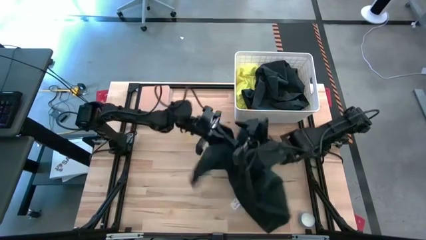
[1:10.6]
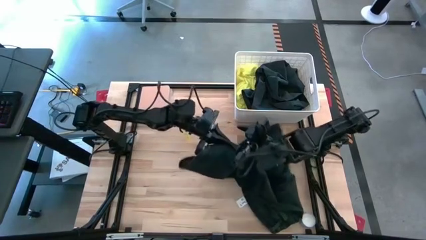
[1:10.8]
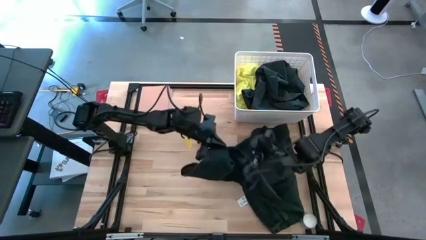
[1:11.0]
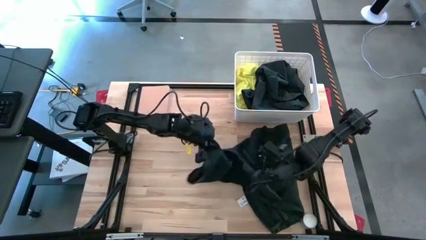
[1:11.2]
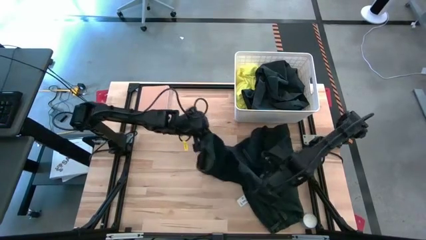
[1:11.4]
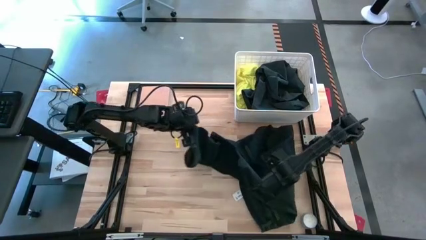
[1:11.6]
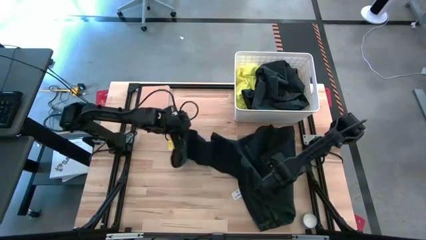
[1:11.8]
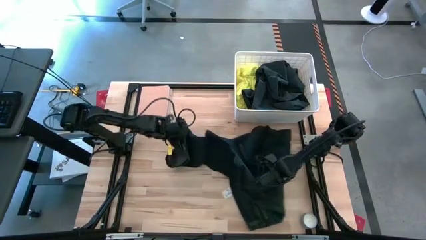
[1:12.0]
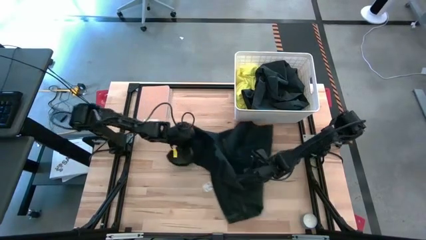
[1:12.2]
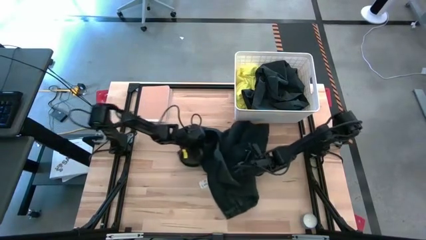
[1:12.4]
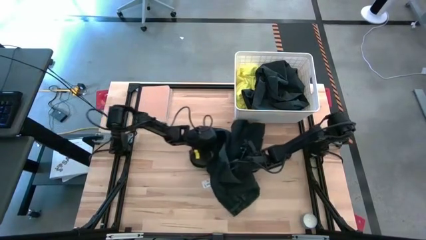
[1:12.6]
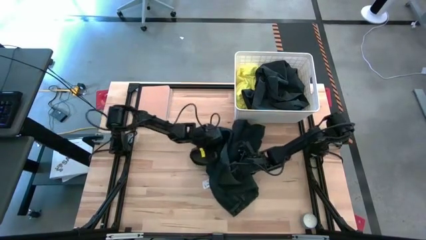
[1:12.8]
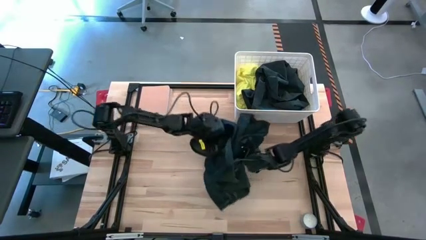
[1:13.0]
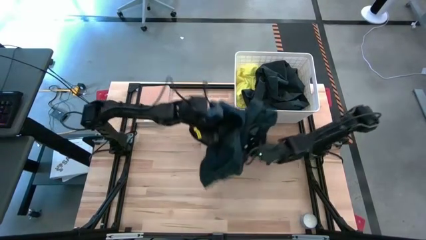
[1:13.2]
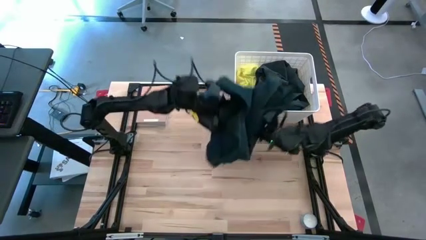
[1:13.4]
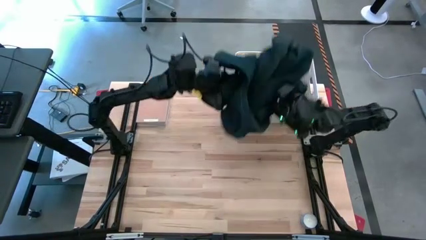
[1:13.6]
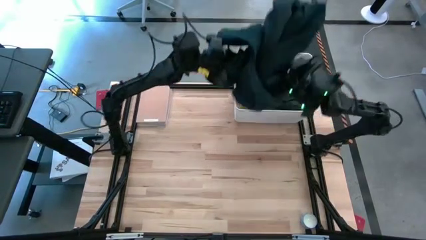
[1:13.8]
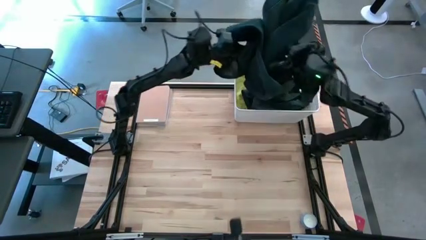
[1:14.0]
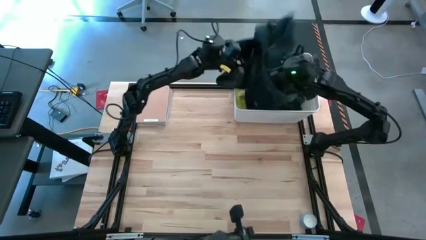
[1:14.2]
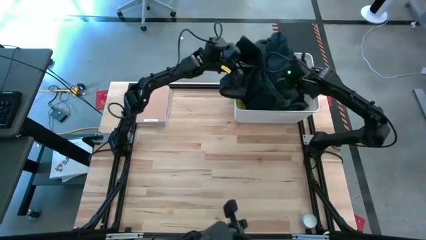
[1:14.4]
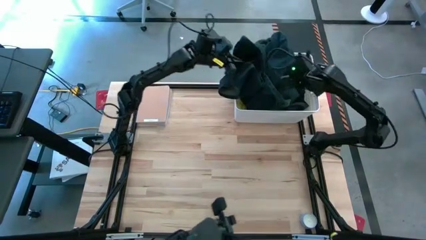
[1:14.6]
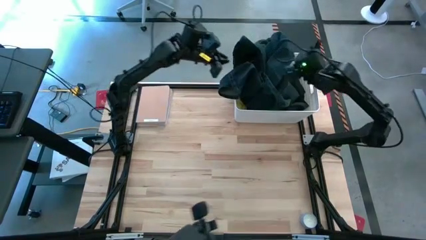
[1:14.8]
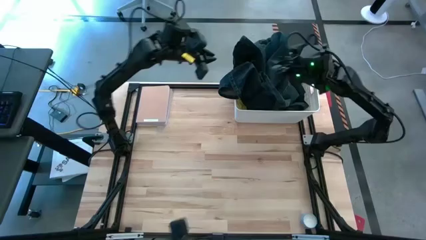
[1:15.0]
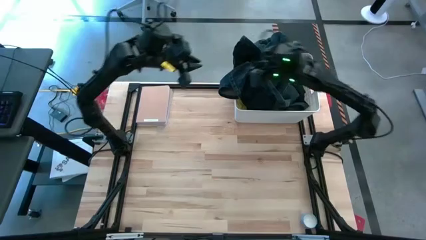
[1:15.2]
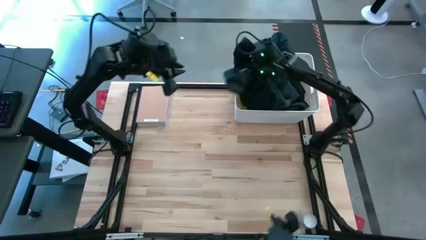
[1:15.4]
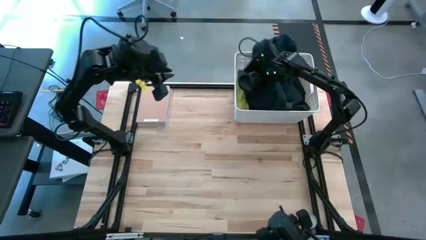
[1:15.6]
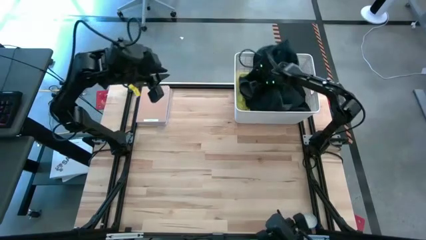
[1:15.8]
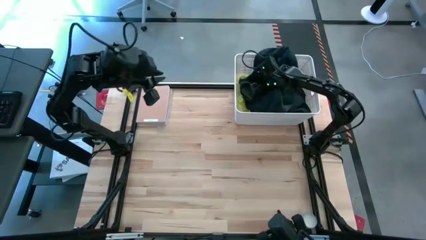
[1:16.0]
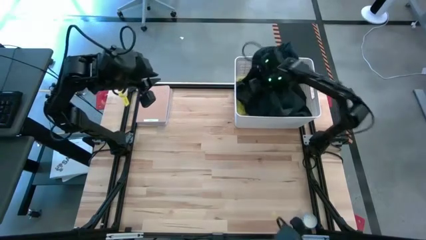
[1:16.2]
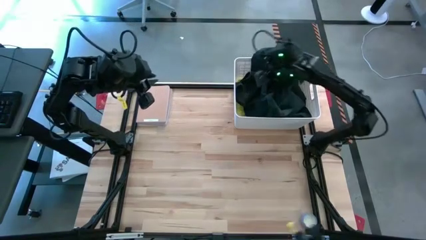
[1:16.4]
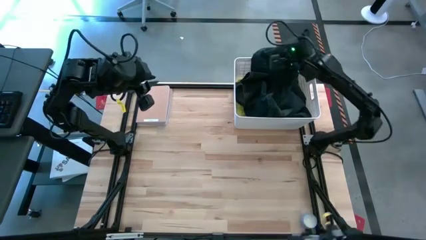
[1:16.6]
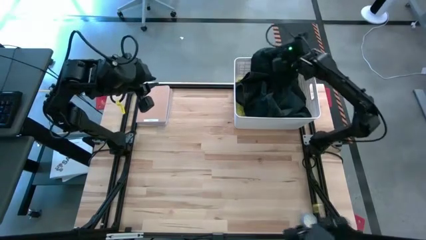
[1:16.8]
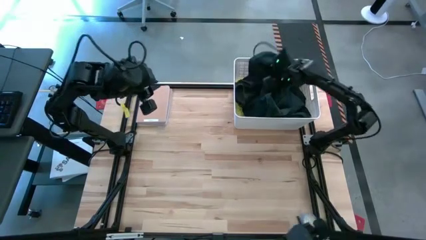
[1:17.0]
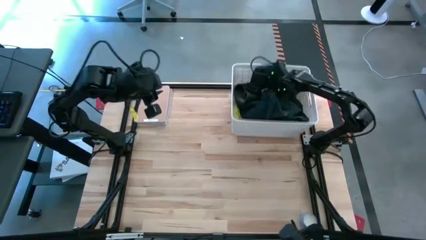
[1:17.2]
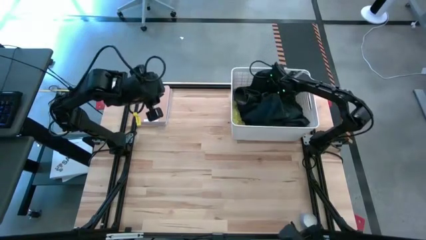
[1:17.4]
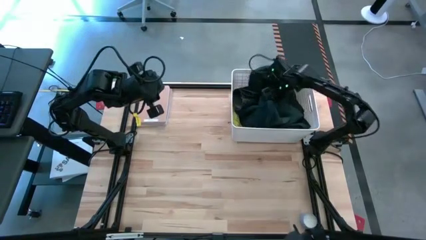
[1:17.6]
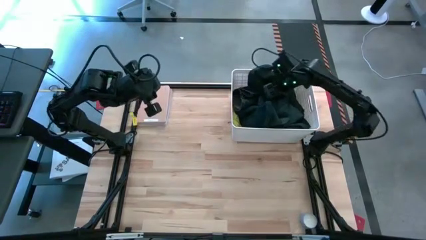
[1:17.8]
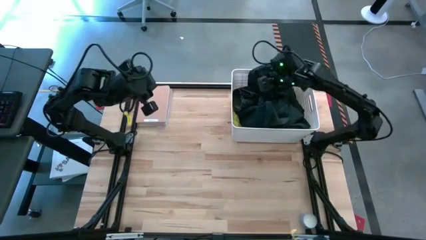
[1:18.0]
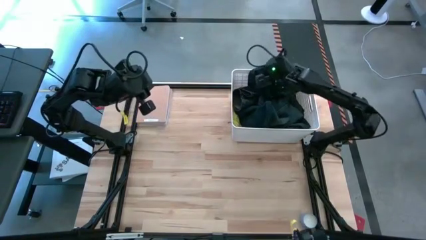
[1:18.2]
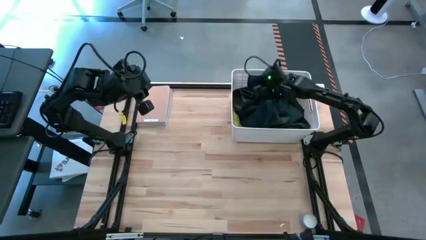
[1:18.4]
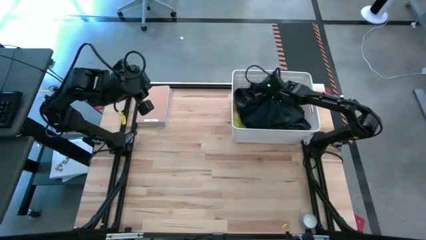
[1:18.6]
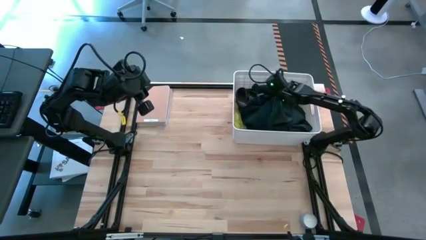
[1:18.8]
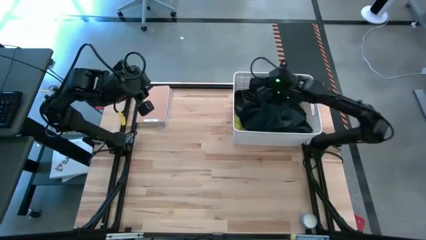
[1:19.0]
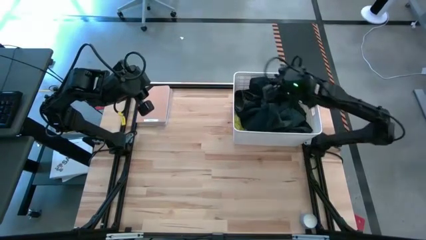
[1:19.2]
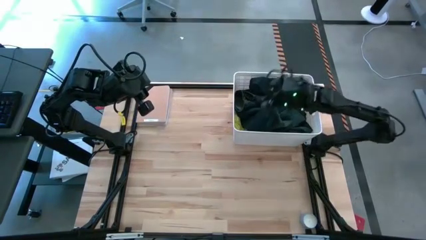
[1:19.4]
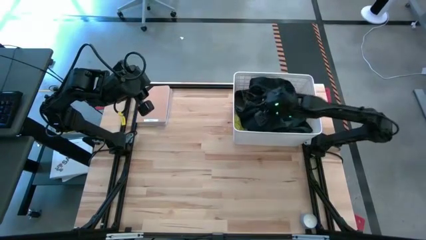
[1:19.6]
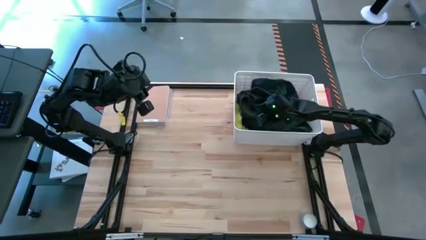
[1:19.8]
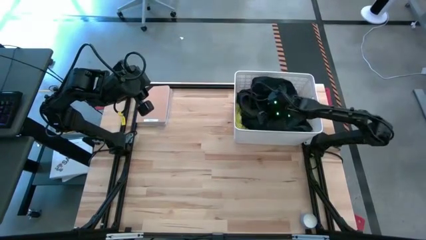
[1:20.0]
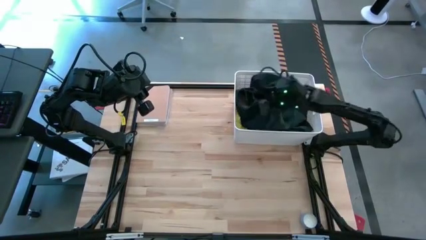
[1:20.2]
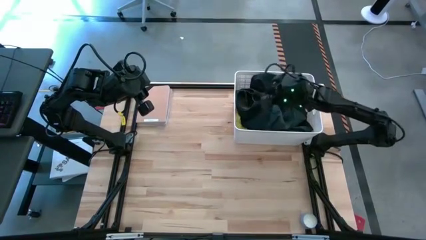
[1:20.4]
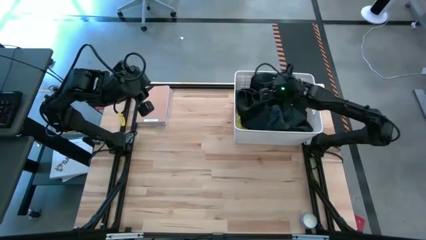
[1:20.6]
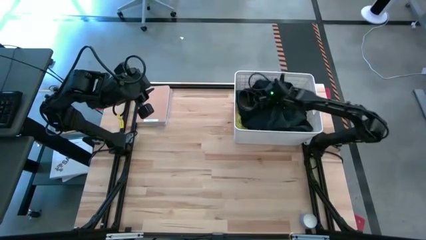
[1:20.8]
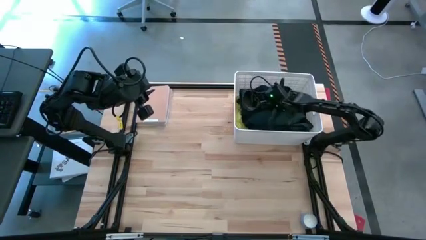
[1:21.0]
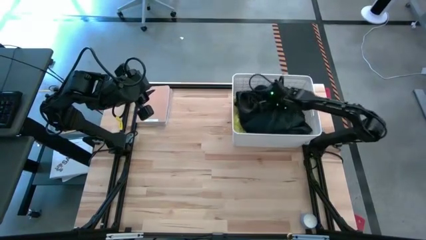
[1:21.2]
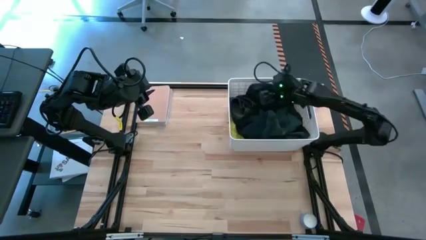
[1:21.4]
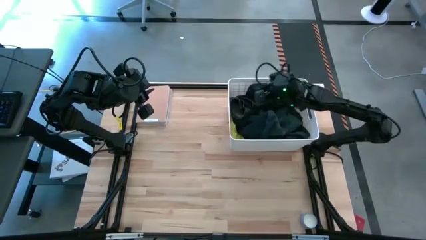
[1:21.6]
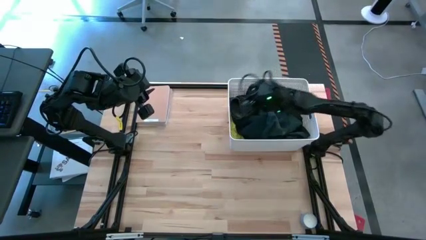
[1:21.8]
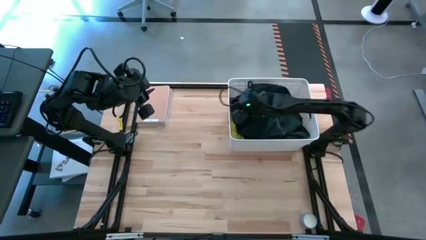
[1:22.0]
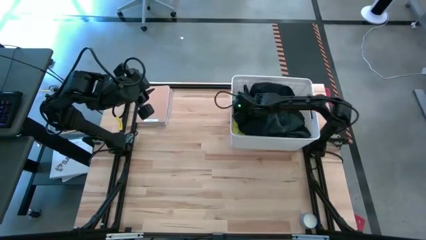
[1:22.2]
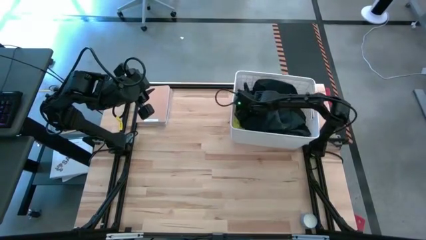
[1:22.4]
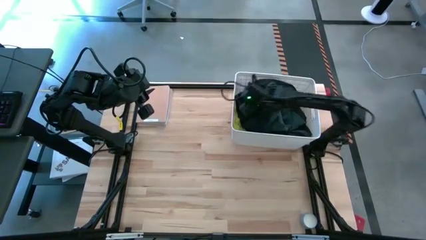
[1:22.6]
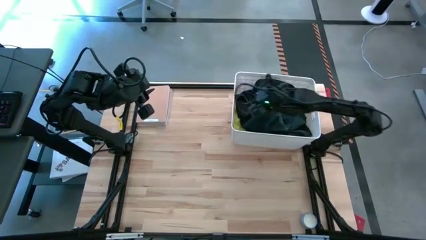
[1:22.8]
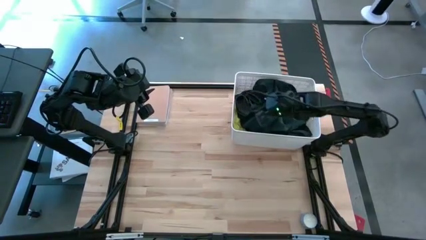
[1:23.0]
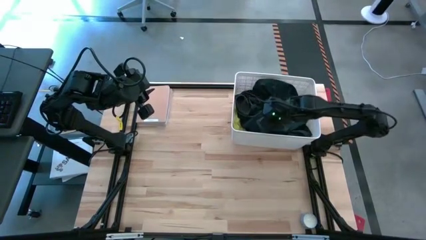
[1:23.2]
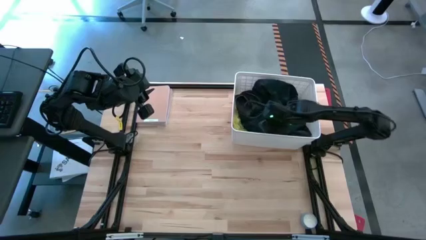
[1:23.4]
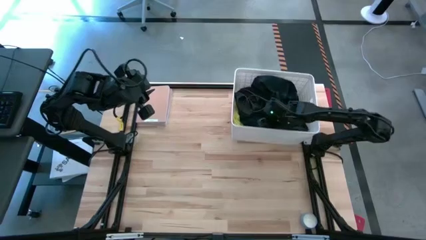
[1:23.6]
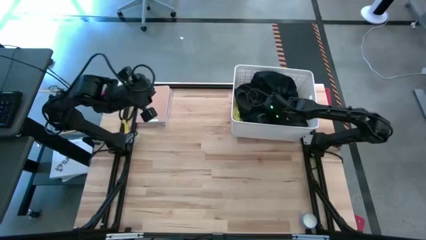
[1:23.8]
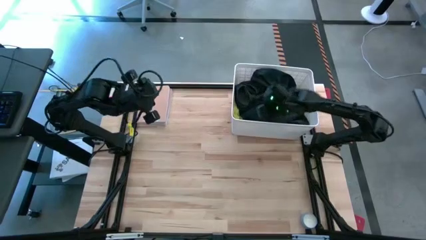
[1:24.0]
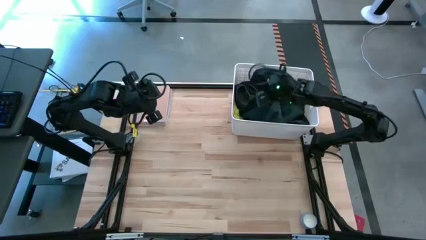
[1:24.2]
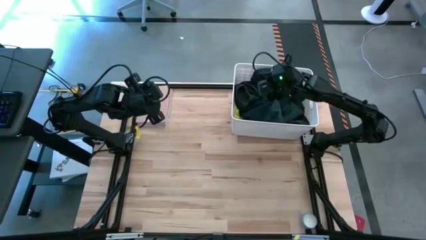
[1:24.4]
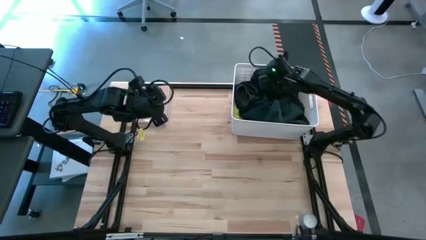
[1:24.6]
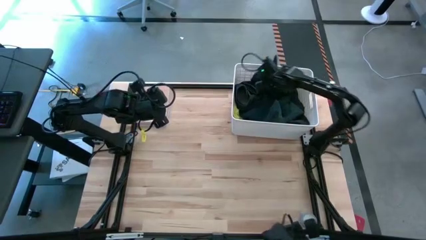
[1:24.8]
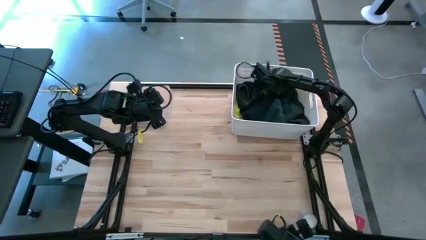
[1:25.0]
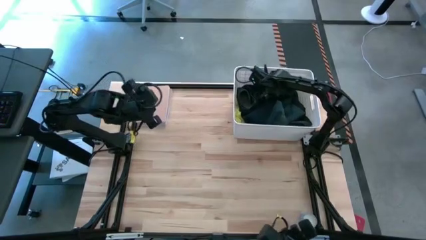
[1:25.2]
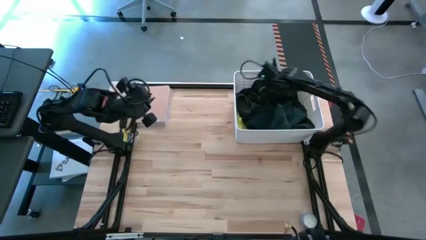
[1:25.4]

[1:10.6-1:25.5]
Task: Sort clothes
Put the dark blue jeans into the white laundry bin

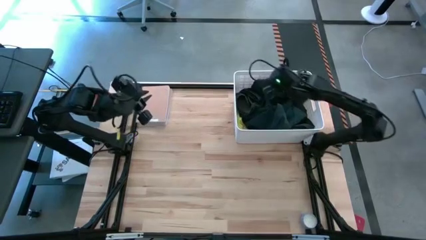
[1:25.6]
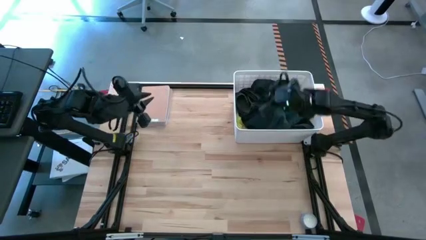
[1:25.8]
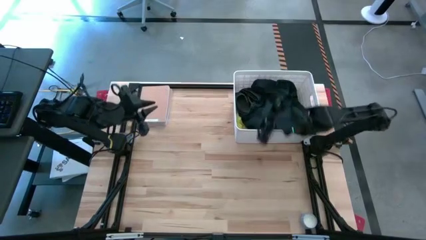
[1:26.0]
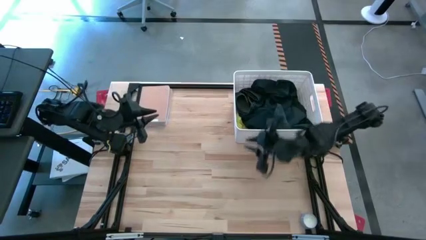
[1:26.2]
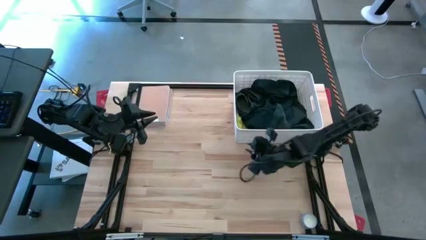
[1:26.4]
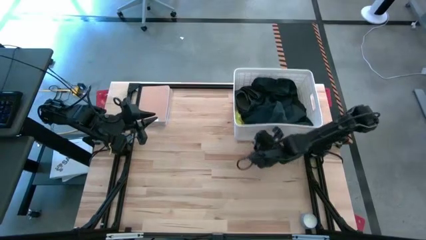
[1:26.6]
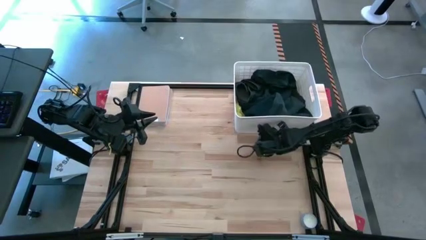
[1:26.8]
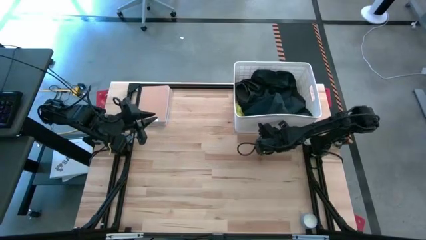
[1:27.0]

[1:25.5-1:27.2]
Move the white laundry bin to the top right of the table
